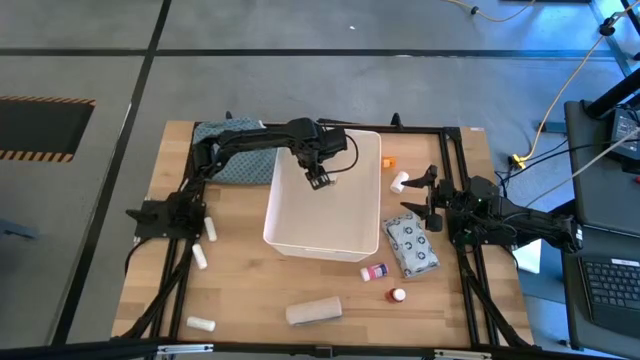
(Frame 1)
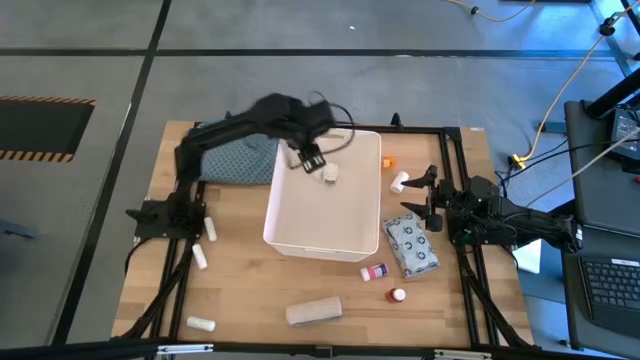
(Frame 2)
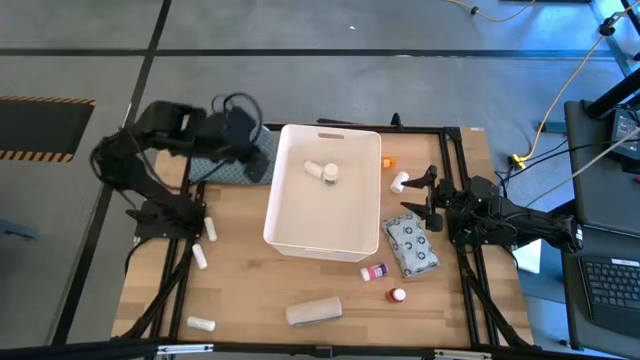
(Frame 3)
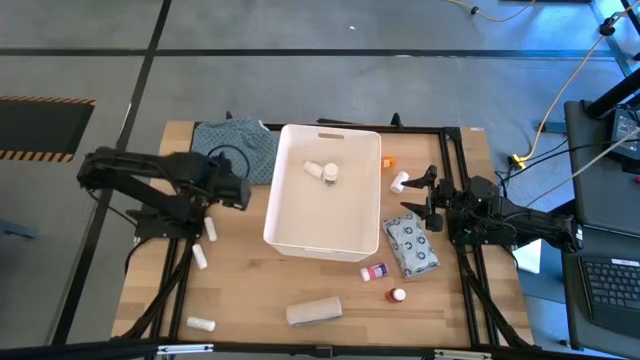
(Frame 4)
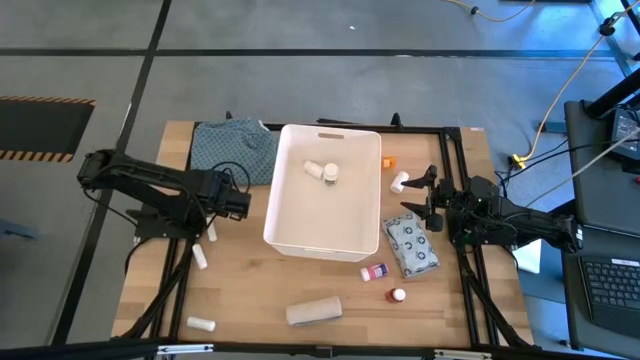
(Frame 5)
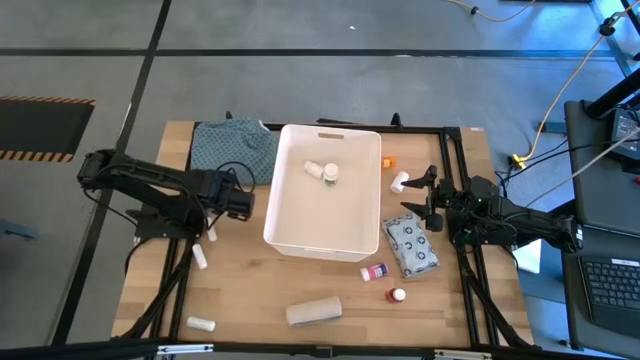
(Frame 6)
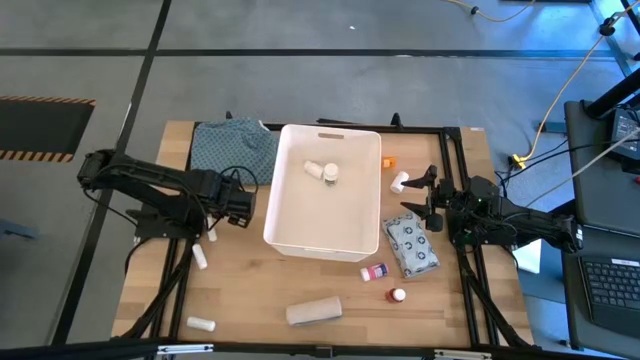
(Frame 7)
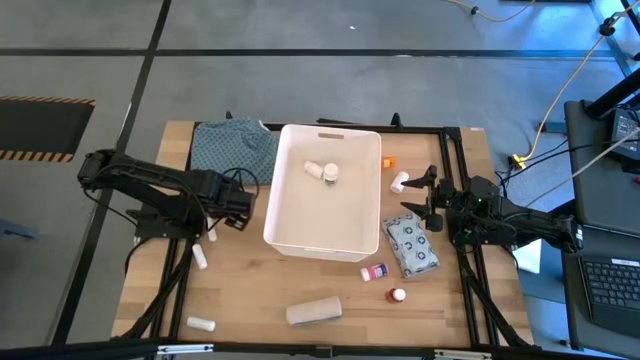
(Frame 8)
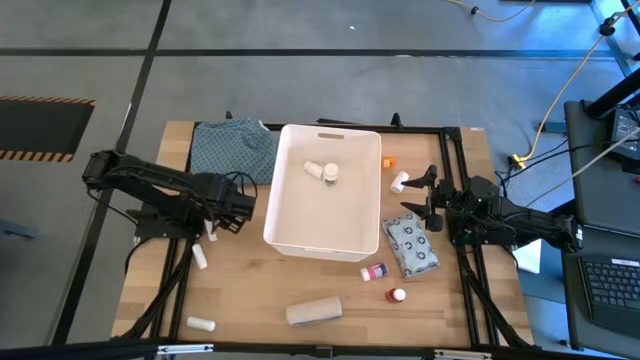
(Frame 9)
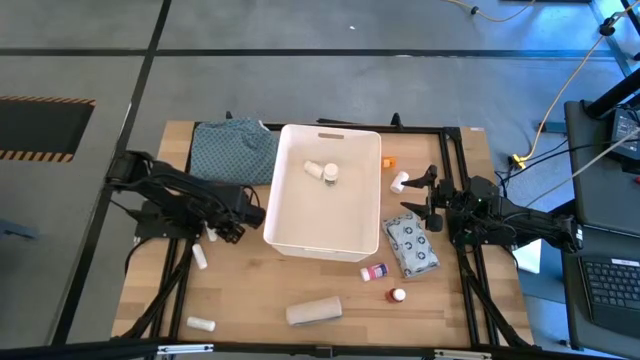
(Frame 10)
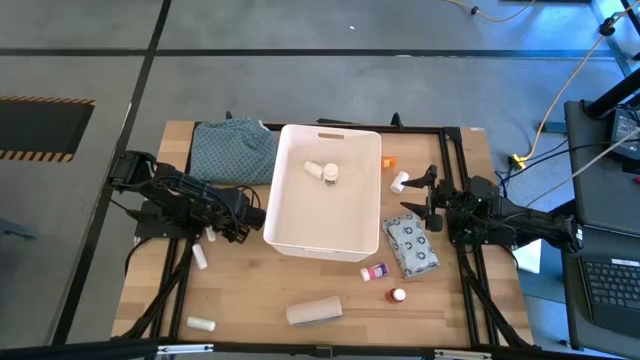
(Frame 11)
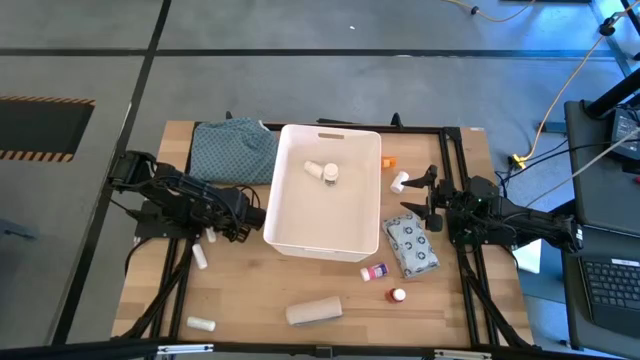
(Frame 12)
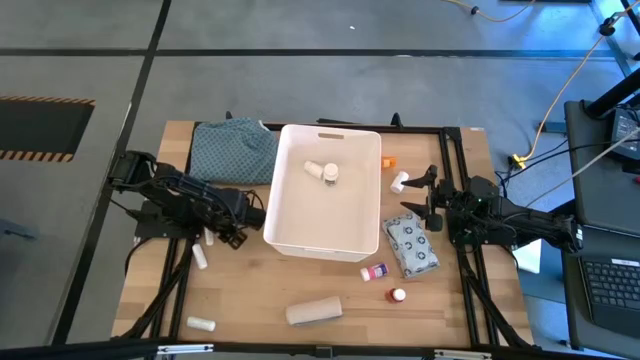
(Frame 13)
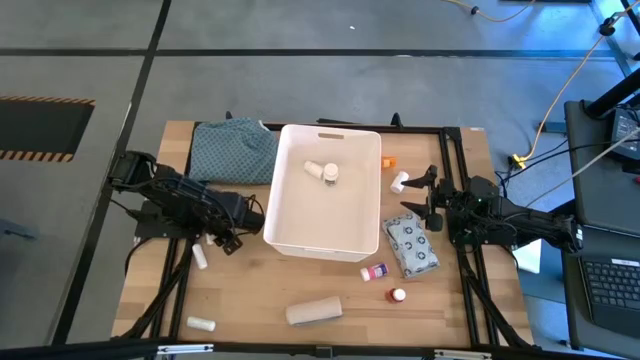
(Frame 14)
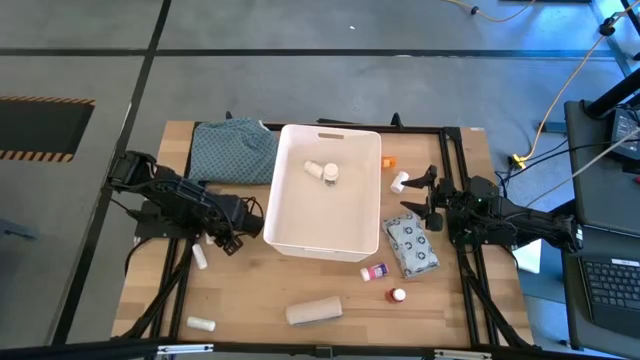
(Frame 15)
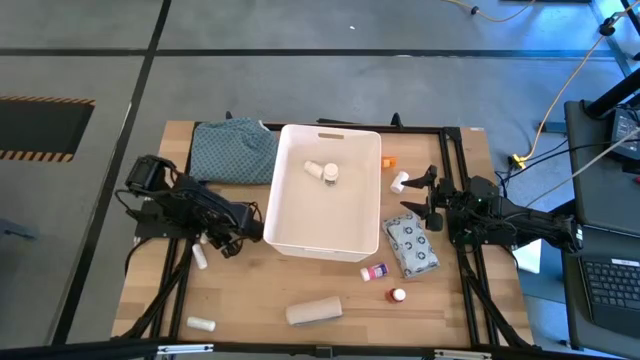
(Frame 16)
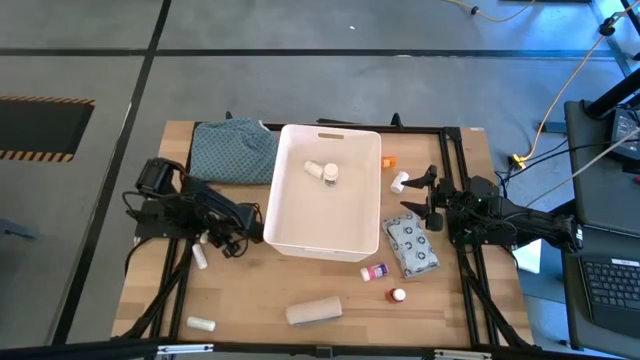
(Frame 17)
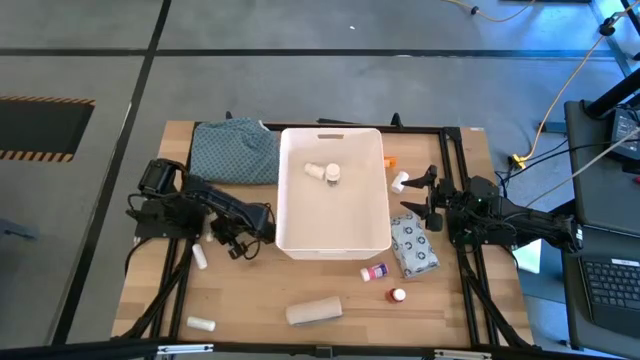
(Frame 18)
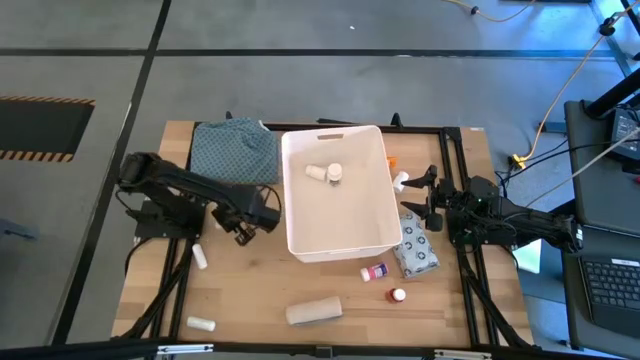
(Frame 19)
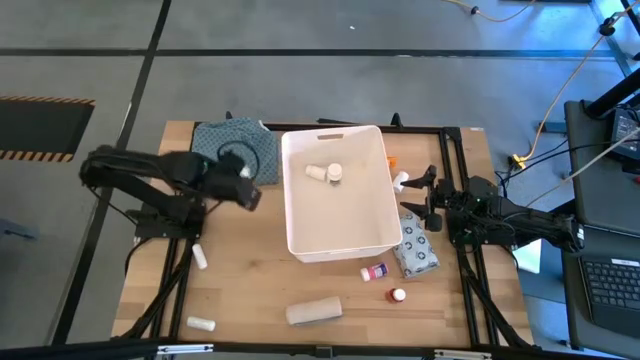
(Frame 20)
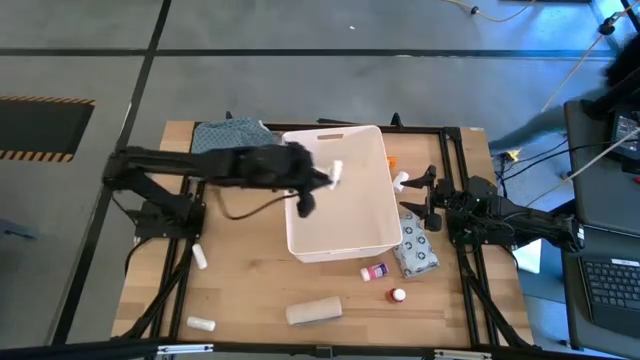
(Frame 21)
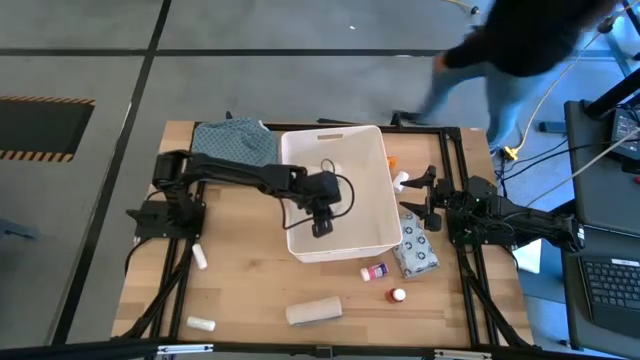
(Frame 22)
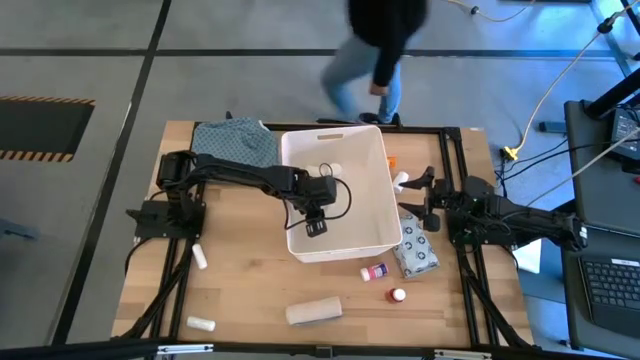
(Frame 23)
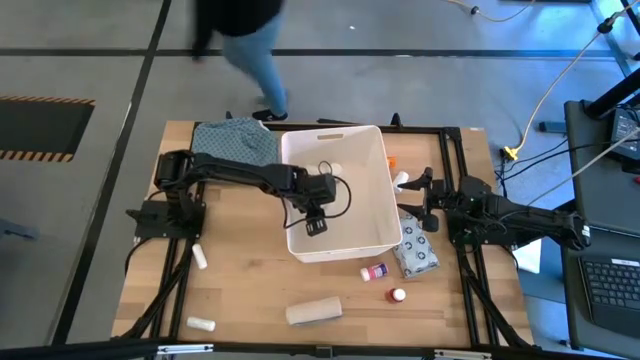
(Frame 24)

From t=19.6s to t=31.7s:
Task: Pick & place medical supplies in basket/bin
Put the top rolled gauze into the white bin

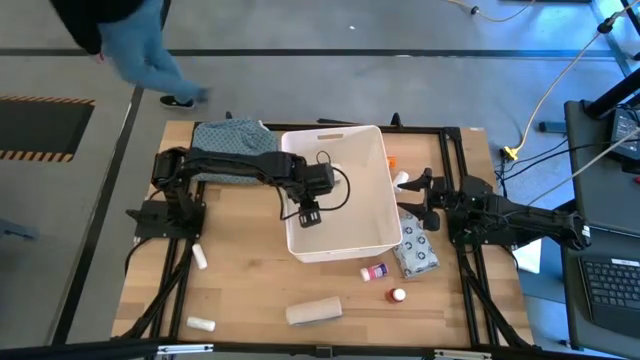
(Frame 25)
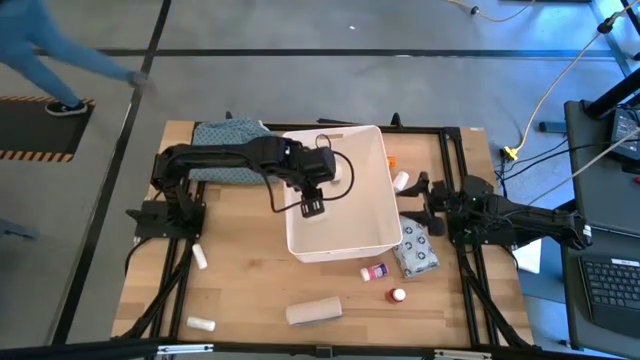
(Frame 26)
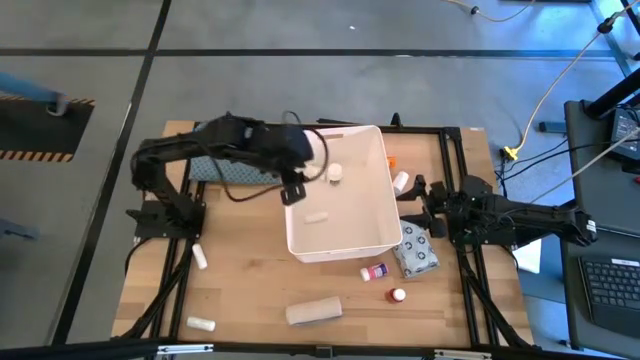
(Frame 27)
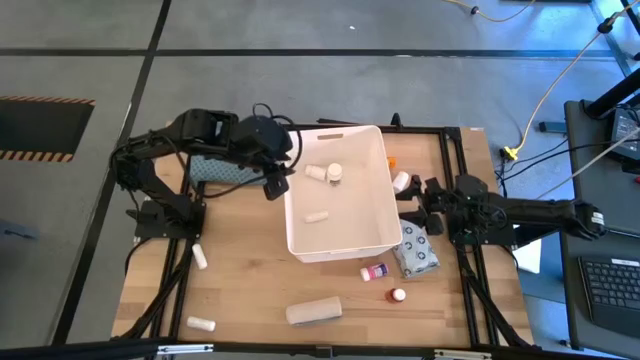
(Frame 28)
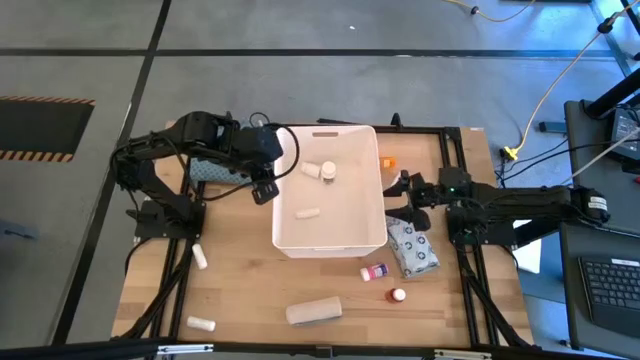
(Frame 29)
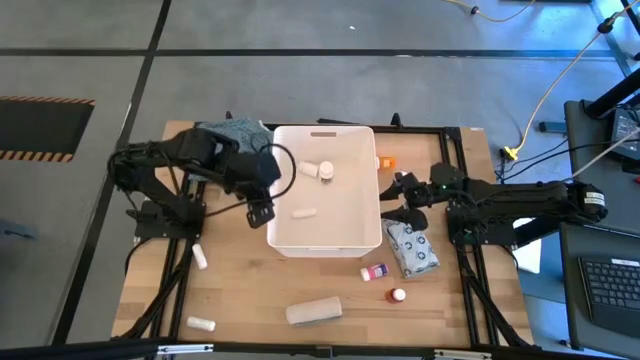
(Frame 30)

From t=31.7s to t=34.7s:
Adjust the white bin

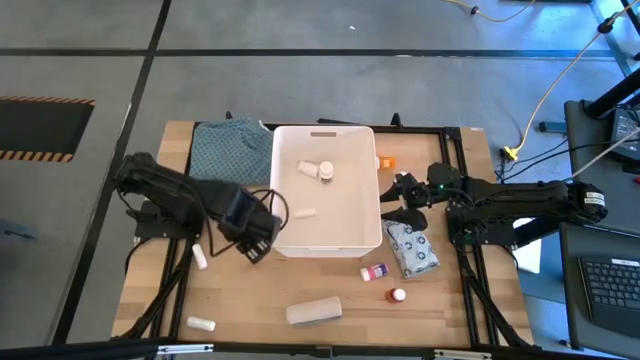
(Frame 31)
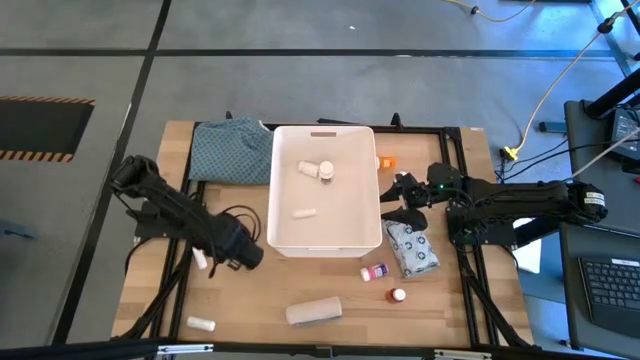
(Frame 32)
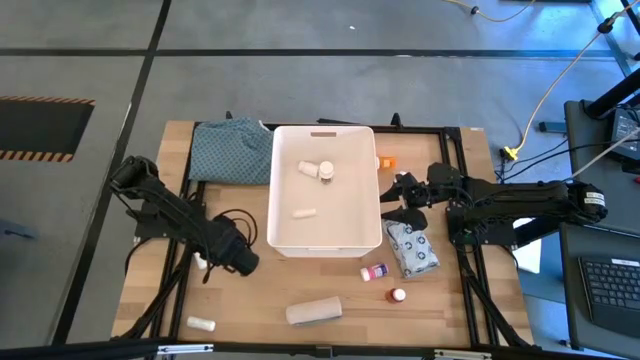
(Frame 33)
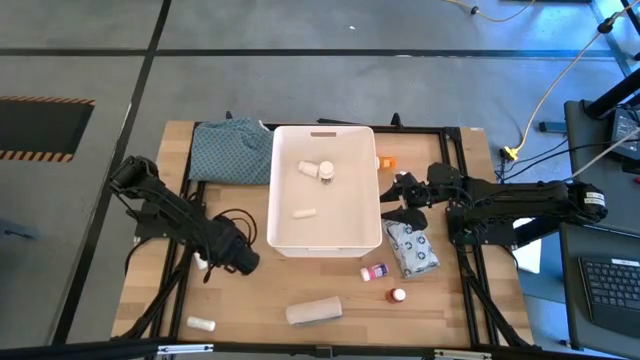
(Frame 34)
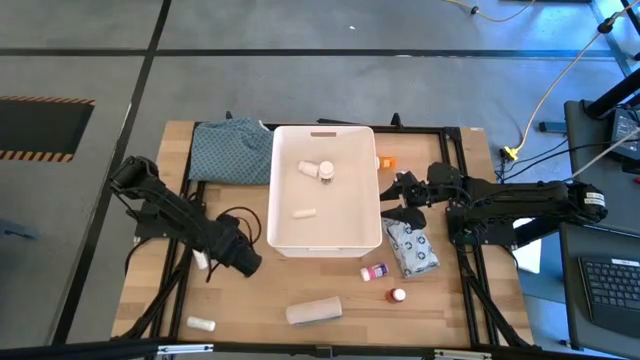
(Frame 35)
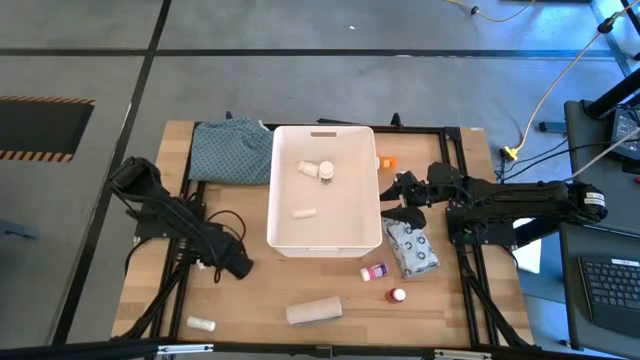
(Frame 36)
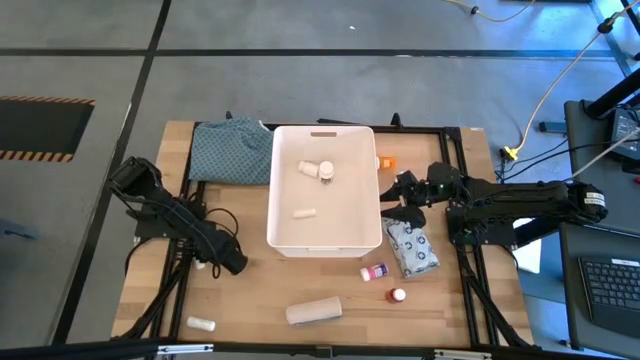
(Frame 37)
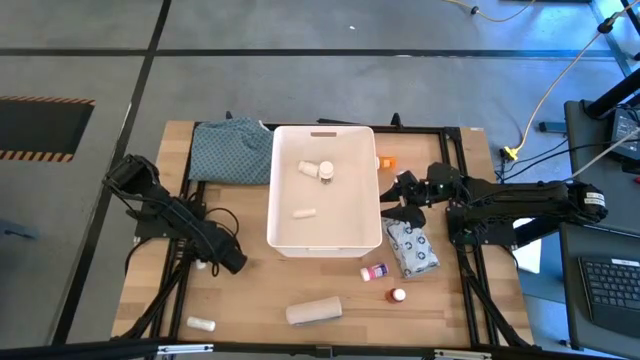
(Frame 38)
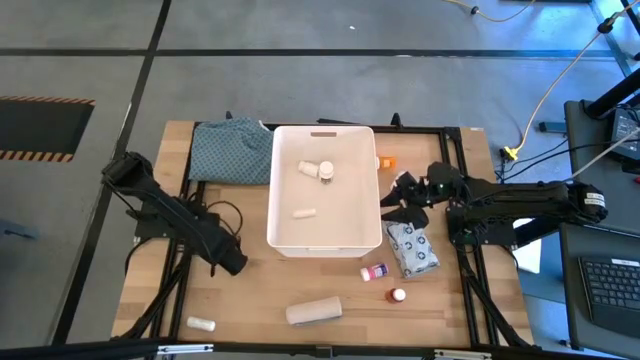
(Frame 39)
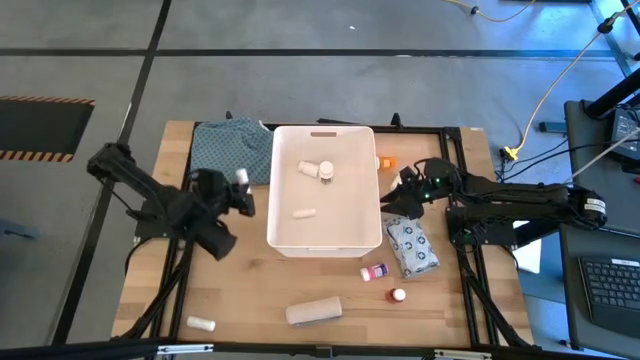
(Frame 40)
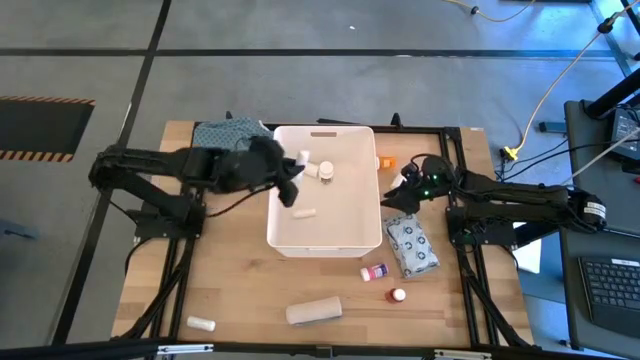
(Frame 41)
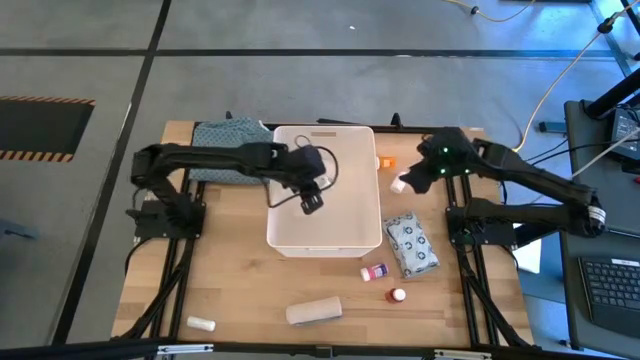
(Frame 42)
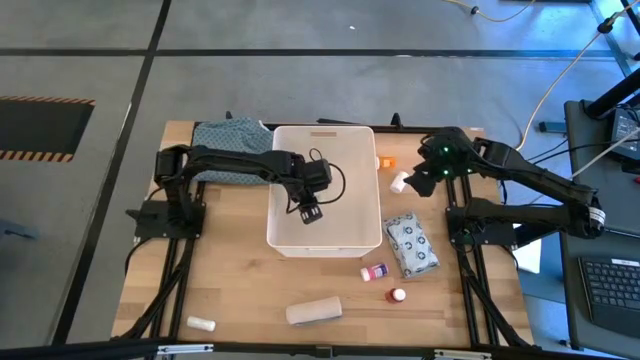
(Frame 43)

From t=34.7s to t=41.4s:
Put the top rolled gauze into the white bin
